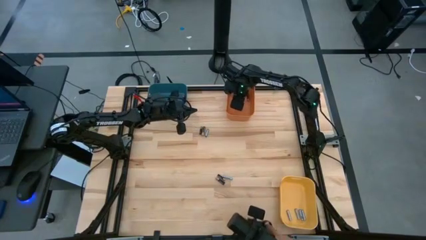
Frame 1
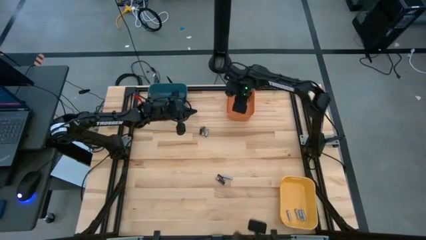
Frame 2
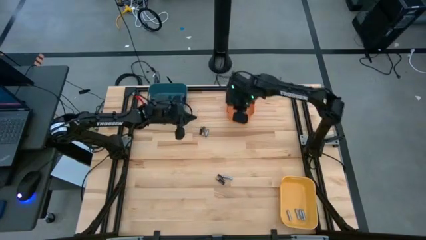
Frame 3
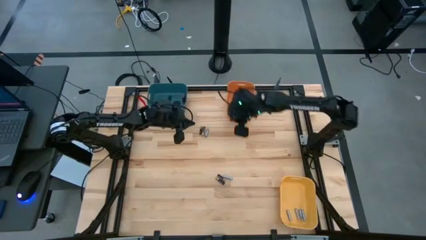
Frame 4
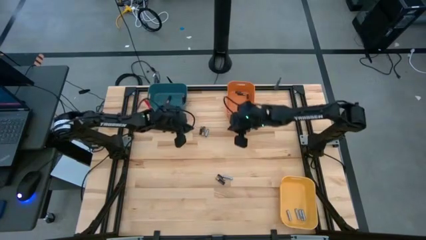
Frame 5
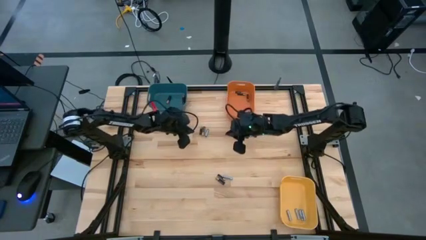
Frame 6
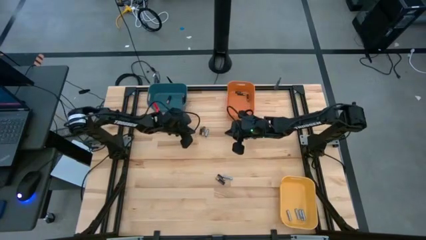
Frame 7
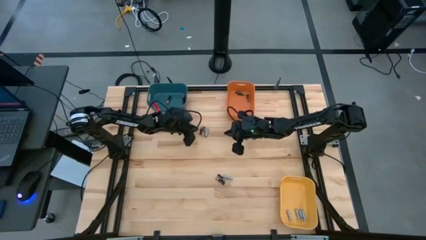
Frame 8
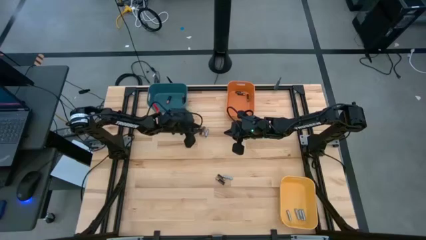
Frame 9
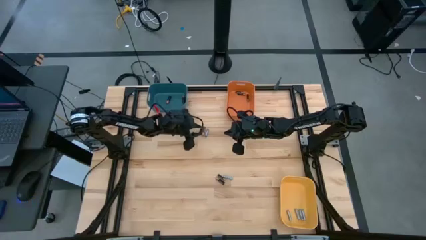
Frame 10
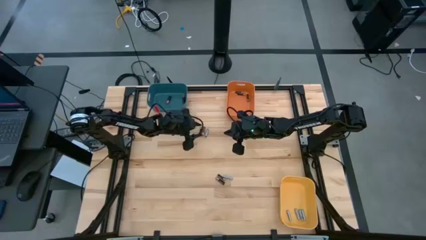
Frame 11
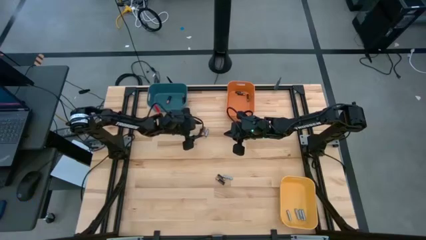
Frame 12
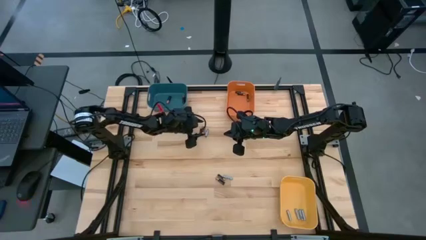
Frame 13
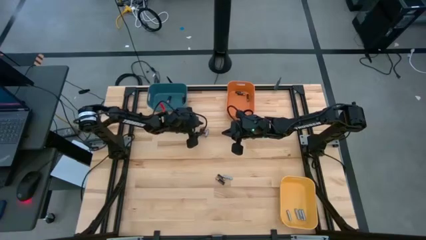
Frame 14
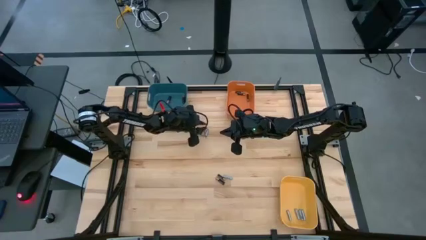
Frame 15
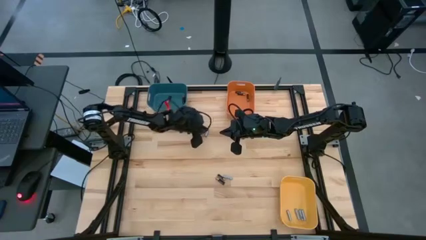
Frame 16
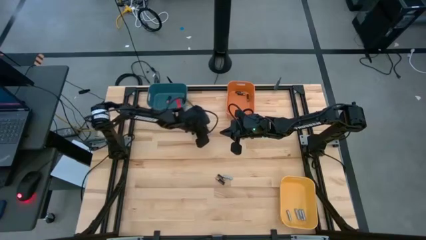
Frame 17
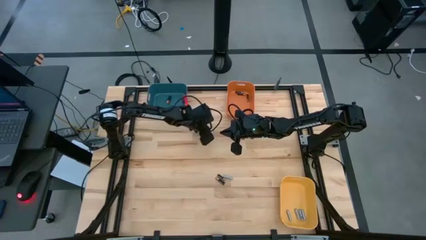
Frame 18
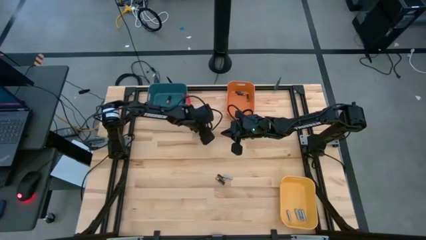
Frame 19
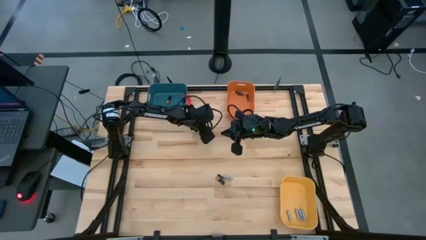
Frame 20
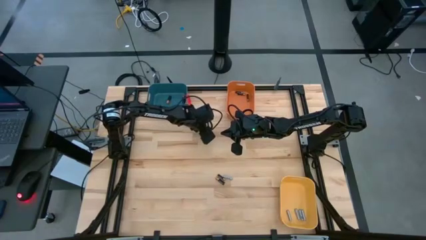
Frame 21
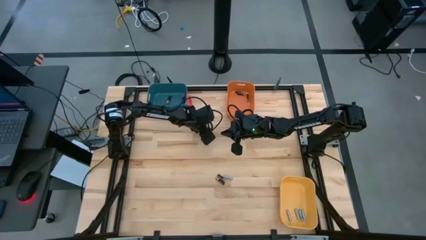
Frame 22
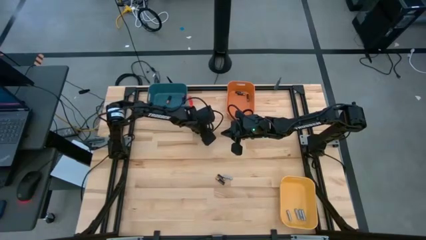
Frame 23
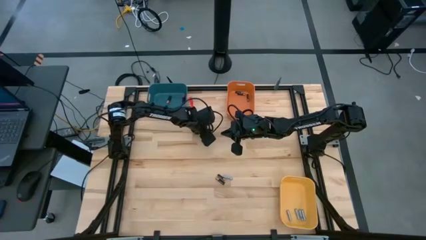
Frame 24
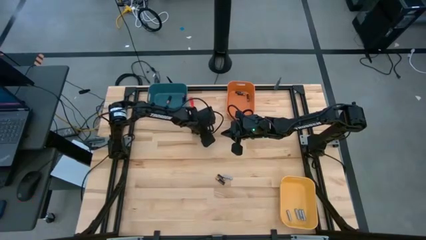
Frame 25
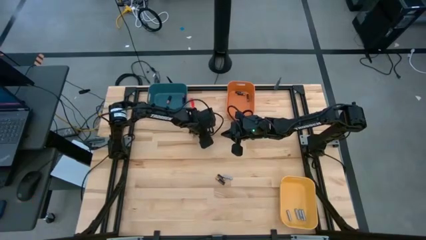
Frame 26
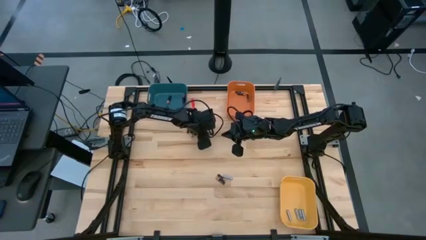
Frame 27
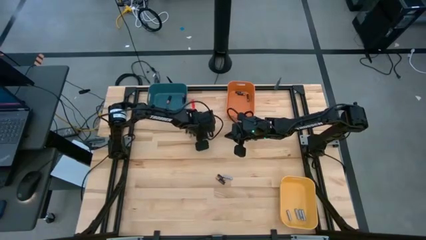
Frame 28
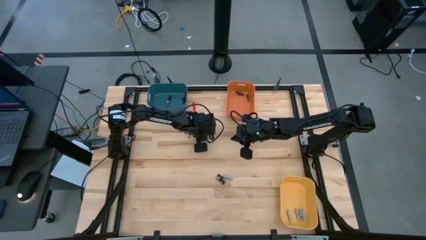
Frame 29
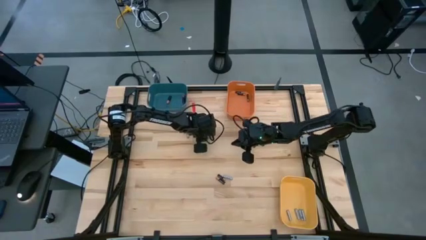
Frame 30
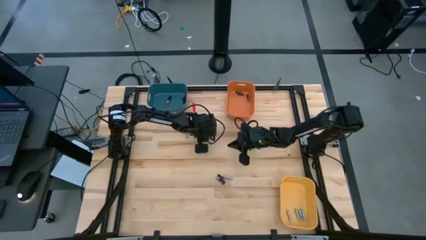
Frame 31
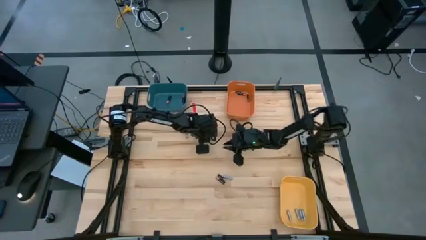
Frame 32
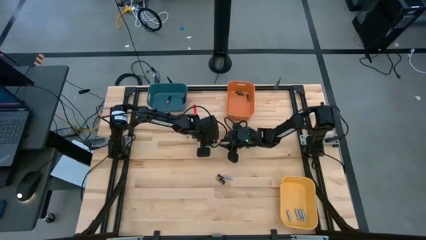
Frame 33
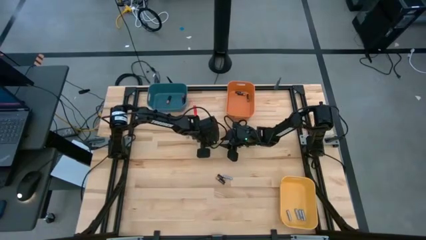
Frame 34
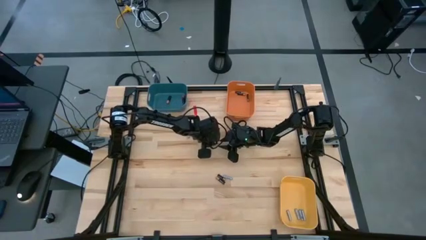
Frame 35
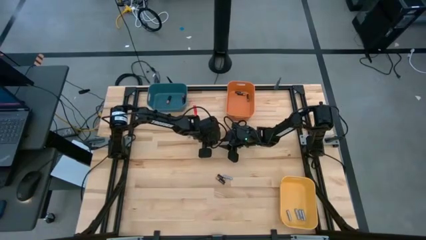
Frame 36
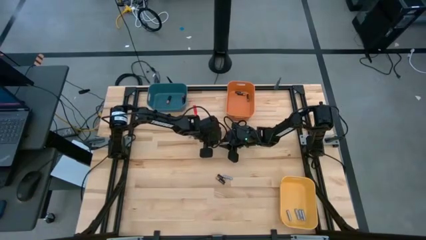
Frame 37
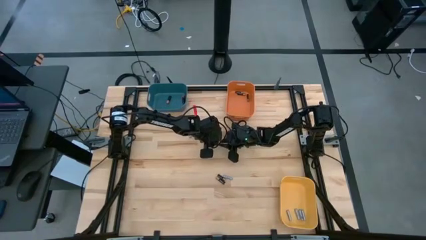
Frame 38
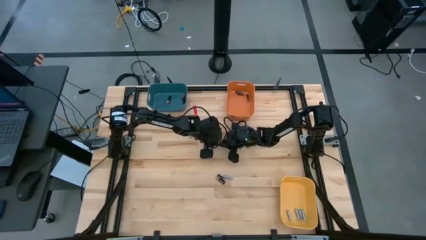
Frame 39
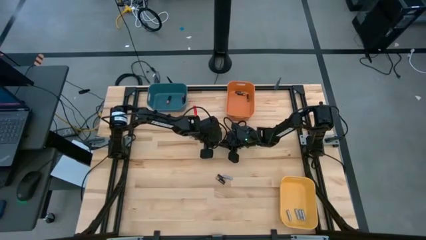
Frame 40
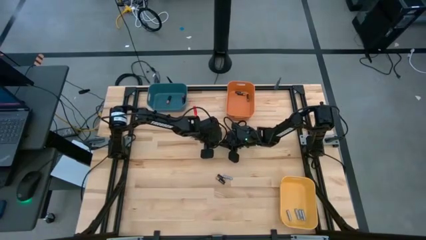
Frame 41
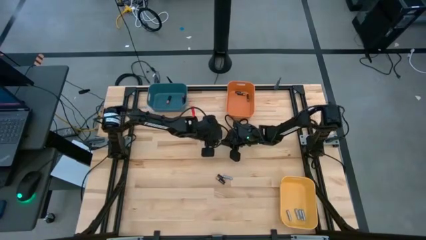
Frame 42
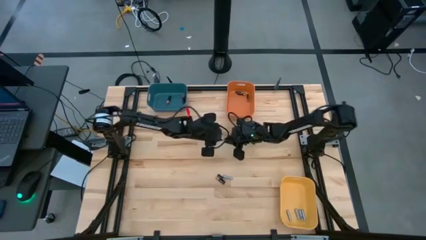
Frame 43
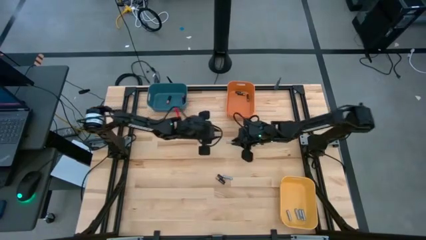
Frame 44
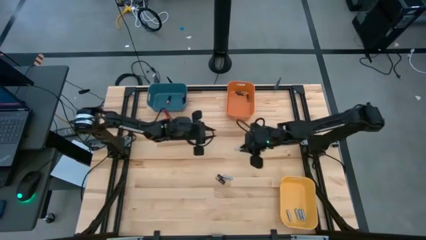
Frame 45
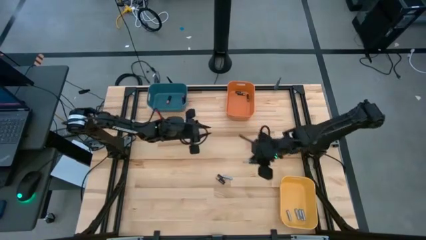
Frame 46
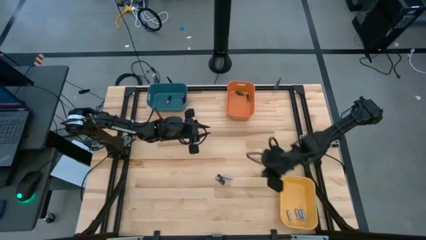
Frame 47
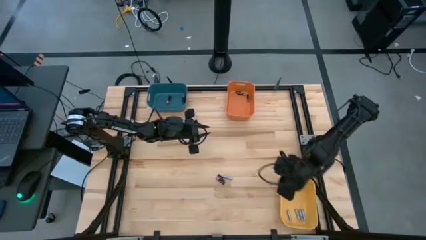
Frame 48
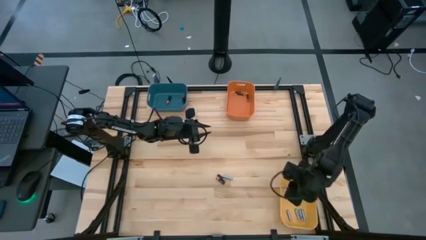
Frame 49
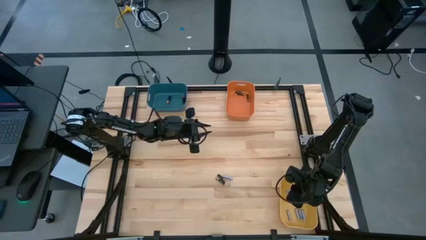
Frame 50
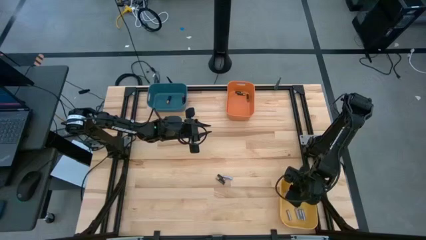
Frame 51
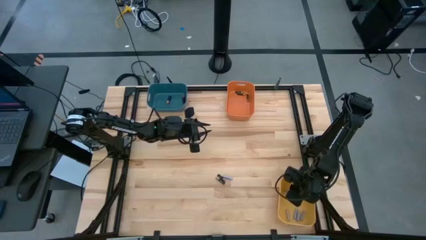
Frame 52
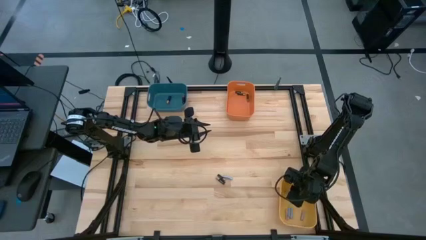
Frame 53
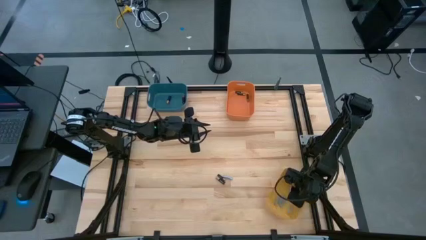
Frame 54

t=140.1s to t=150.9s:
Task: Sort batteries
Put the silver battery into the yellow bin
